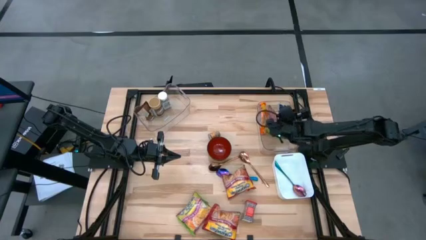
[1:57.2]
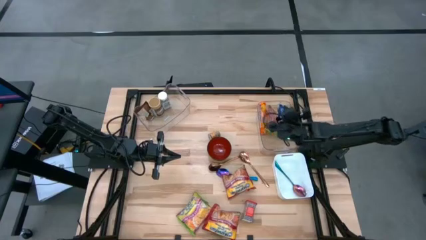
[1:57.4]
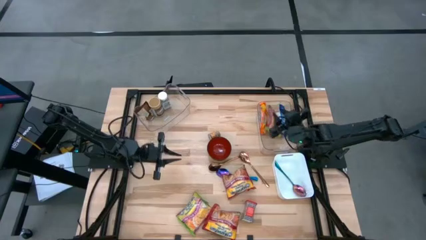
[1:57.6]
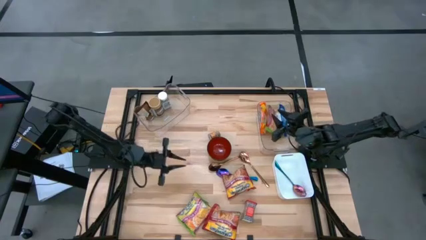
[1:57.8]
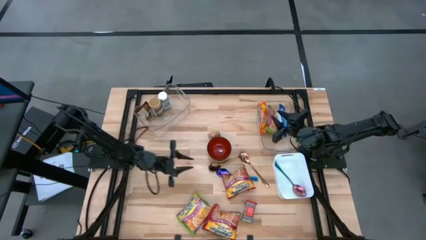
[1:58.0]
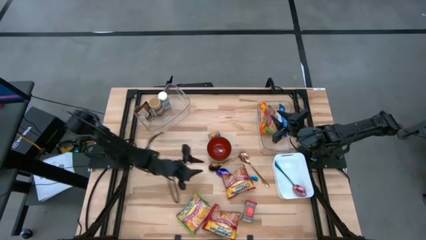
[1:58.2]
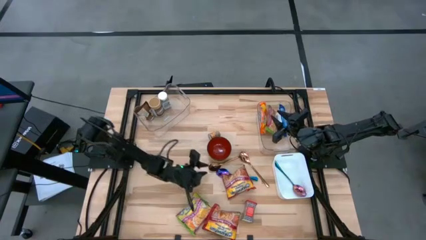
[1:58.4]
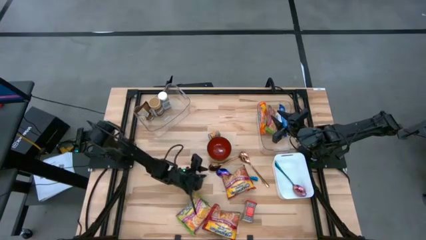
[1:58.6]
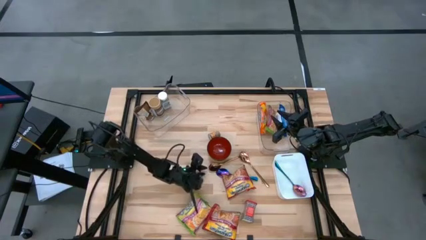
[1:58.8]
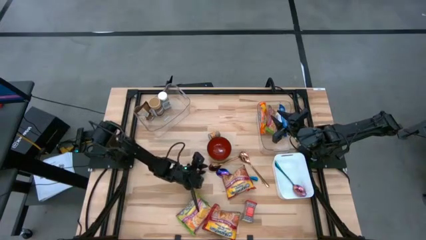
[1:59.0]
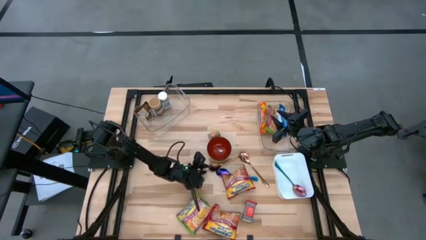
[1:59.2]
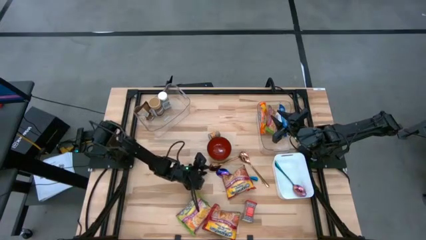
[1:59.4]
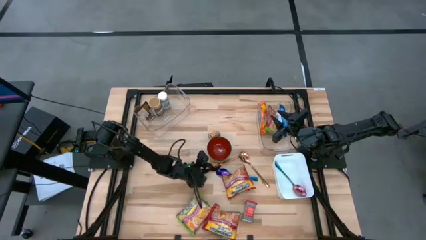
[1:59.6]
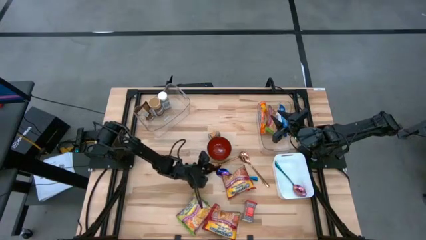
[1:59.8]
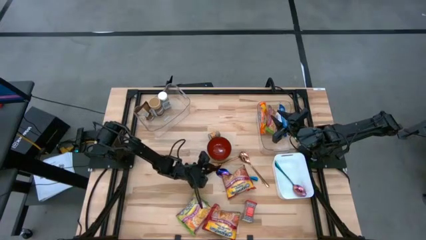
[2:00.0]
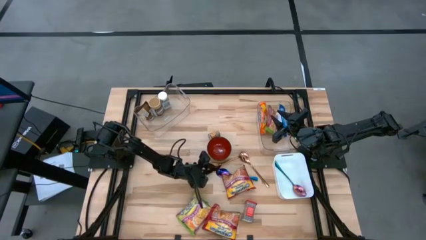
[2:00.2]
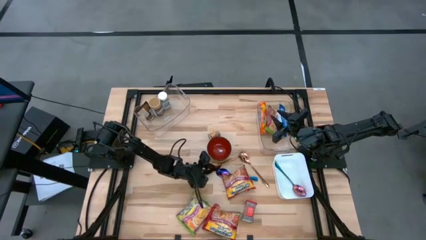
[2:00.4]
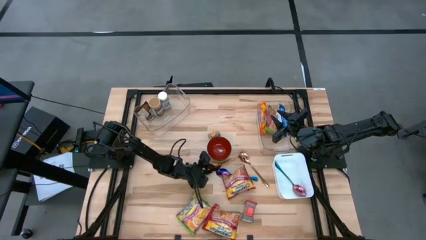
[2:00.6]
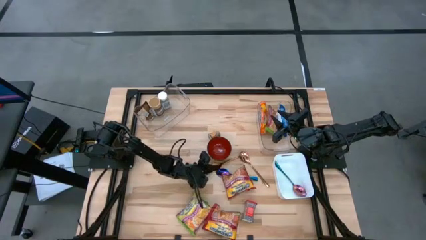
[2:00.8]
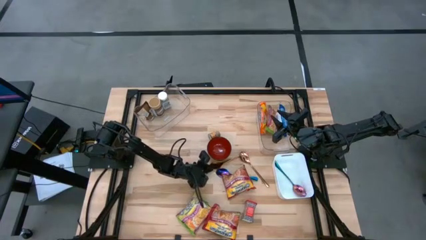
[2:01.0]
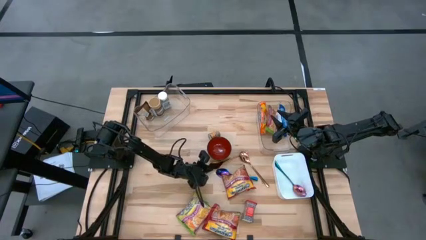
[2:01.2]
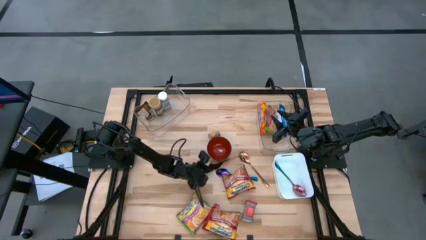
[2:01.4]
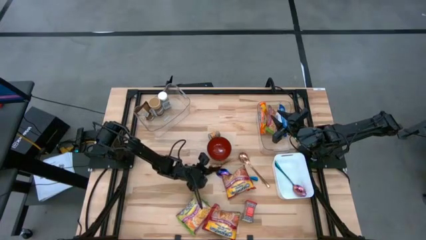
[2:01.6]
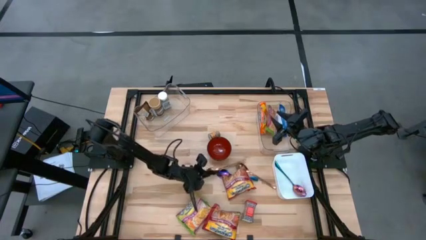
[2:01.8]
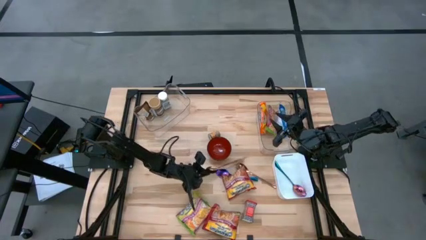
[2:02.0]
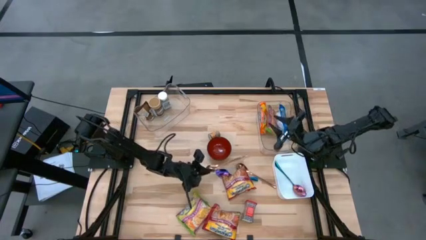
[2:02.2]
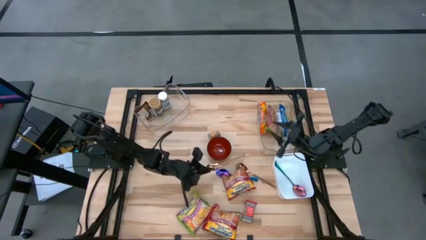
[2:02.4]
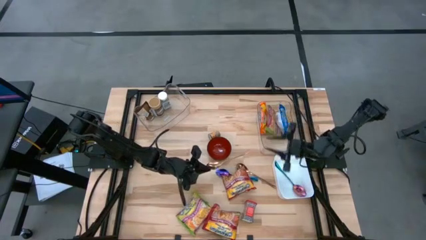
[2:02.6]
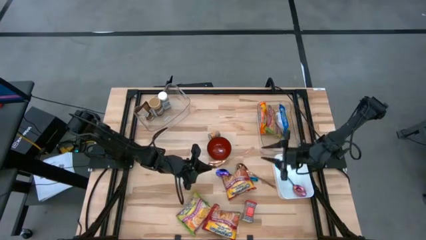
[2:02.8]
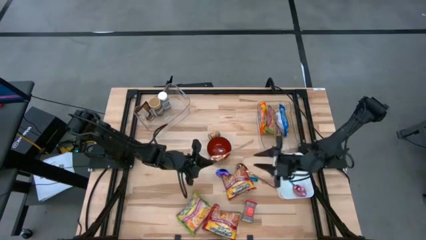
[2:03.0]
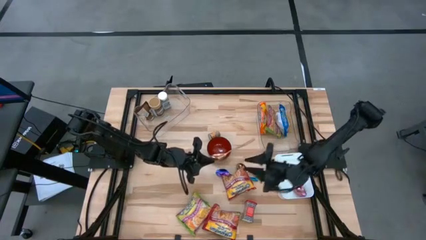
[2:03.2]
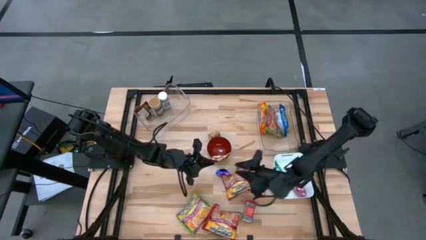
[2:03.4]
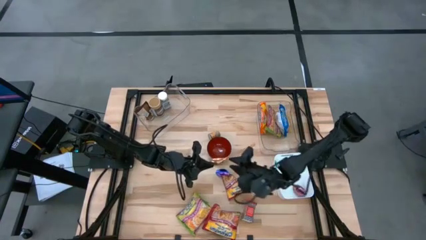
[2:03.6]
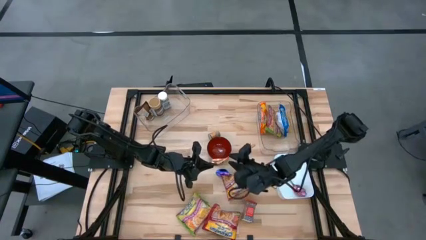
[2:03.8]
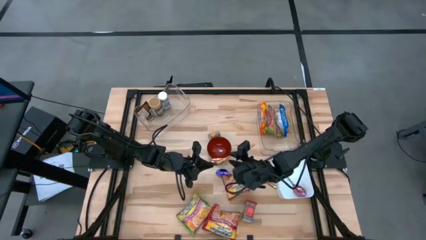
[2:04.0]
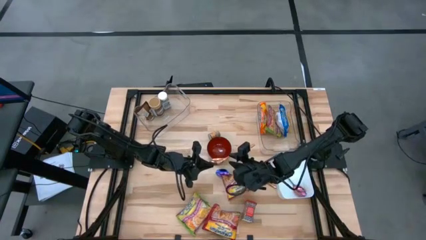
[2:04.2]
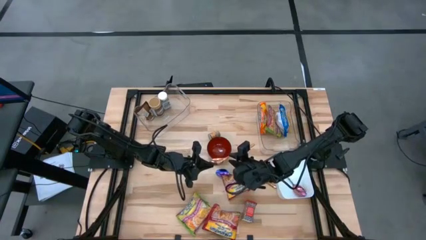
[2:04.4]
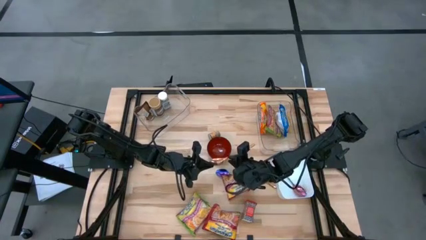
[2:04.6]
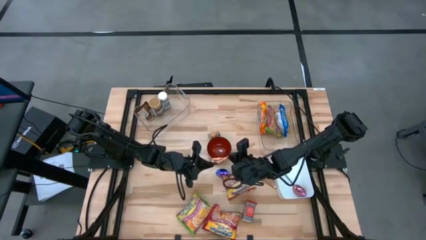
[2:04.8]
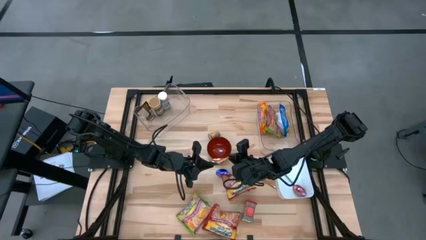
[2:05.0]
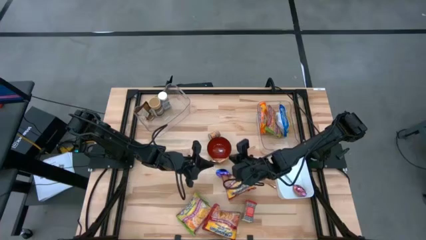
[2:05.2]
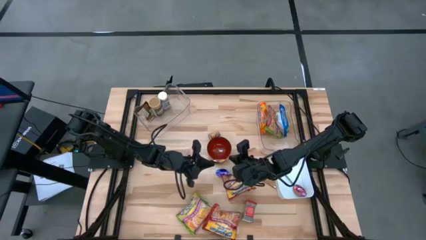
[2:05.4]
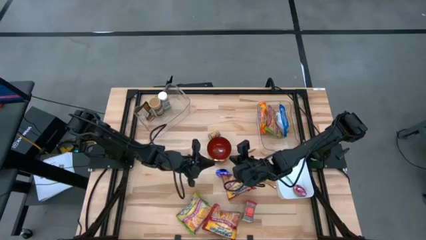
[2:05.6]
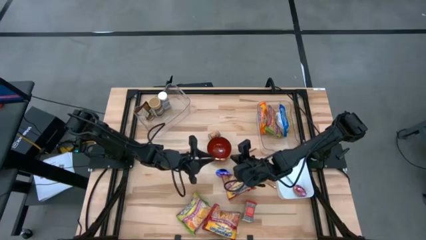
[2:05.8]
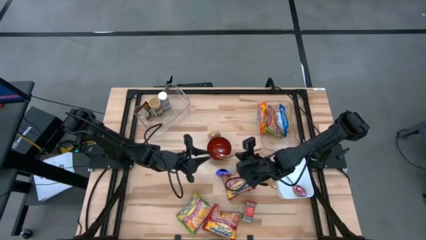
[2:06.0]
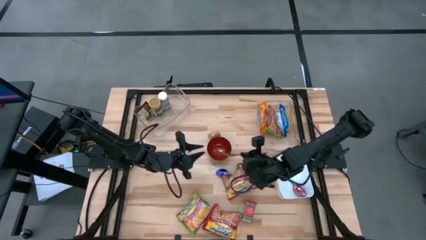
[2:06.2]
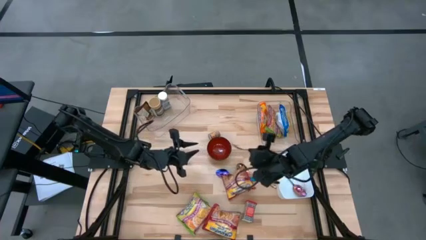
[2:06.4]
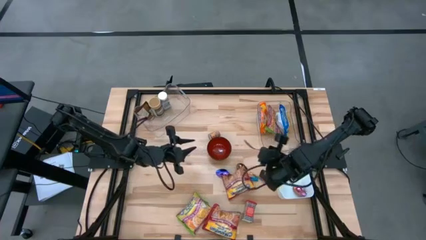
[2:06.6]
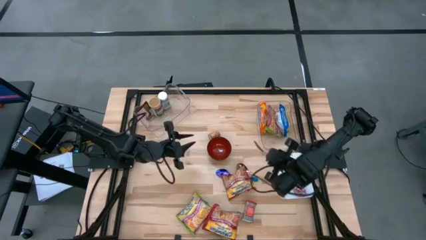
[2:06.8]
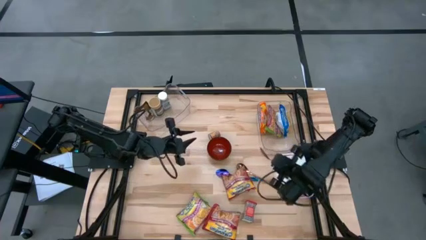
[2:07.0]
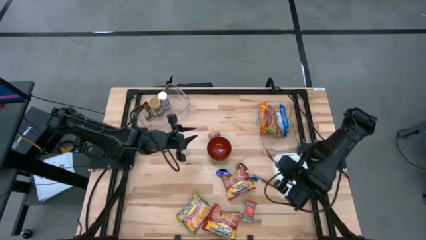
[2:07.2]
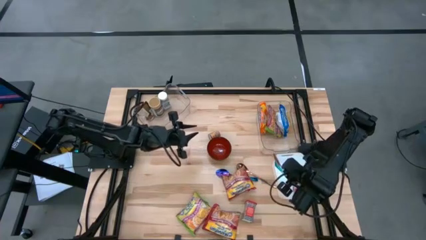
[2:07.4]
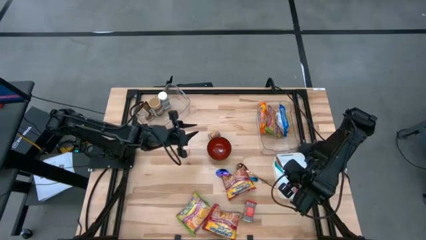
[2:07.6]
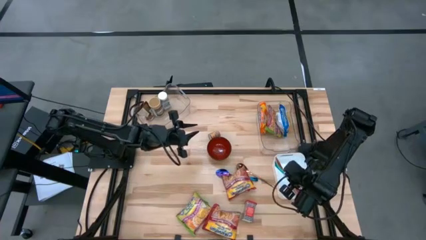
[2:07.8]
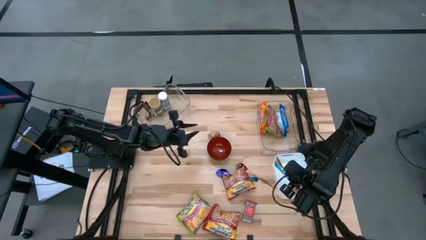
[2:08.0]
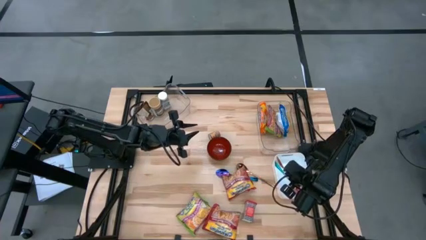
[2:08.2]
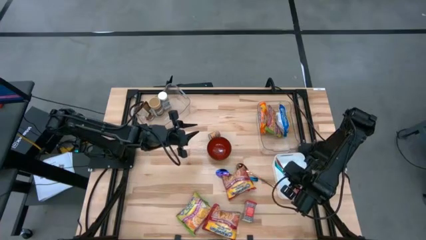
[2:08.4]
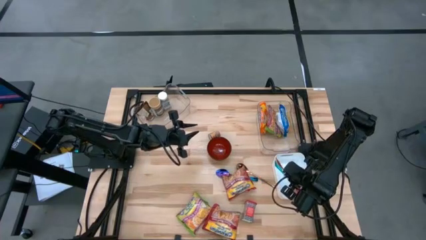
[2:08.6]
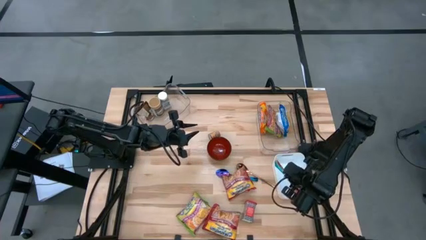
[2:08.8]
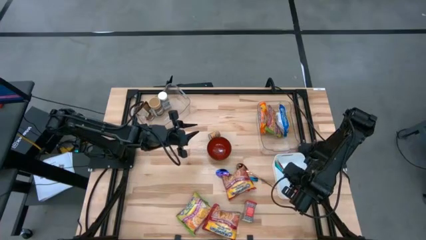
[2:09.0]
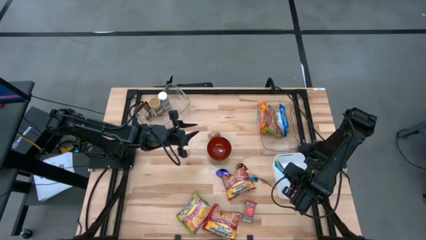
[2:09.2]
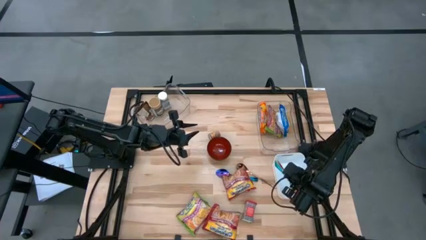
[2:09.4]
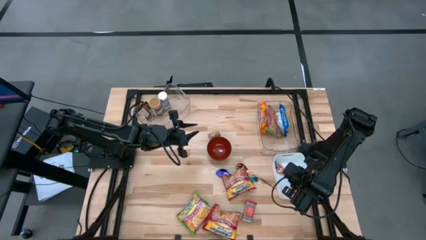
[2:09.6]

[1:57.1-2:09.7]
Task: Pick & Place Food Item
Put the left brown spoon into the white bin

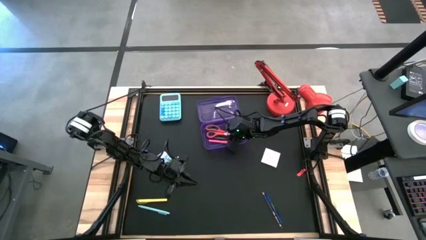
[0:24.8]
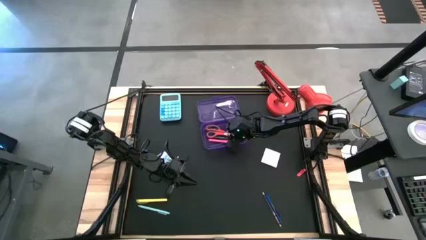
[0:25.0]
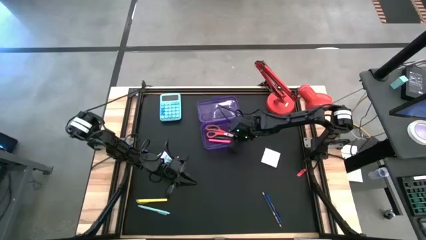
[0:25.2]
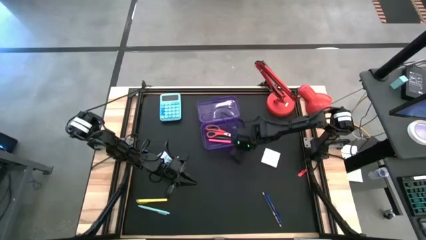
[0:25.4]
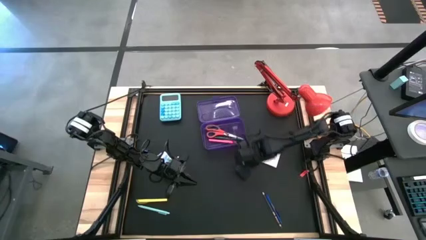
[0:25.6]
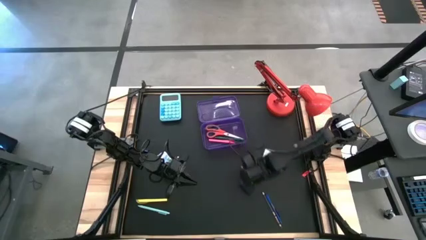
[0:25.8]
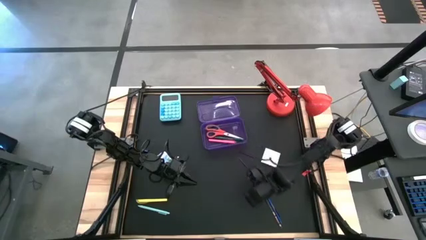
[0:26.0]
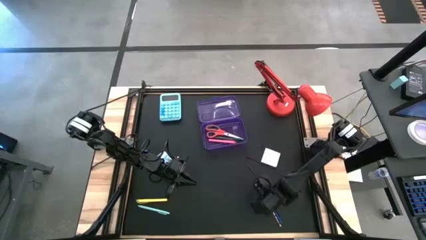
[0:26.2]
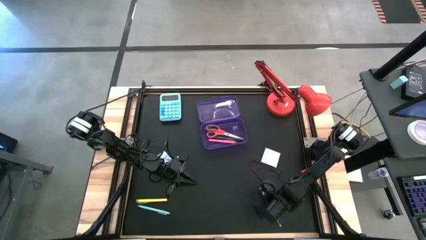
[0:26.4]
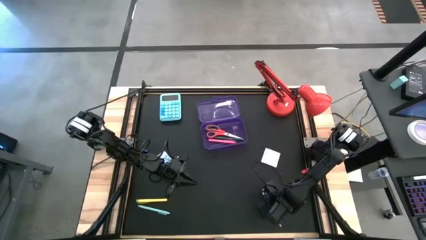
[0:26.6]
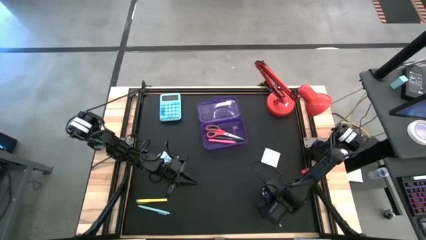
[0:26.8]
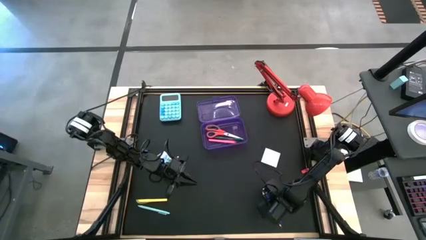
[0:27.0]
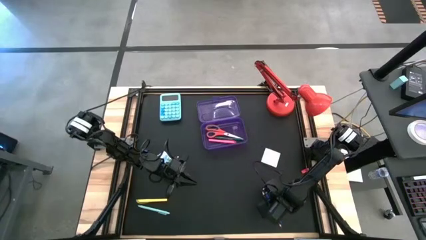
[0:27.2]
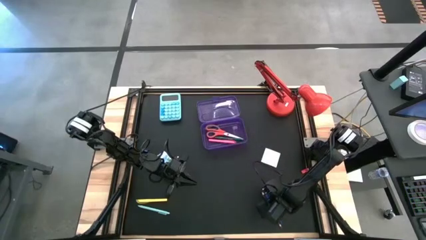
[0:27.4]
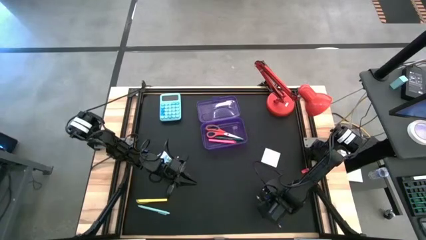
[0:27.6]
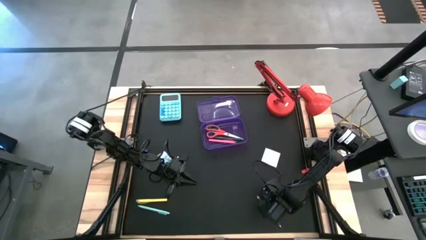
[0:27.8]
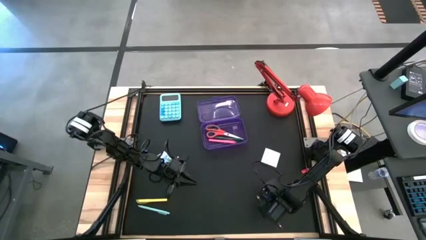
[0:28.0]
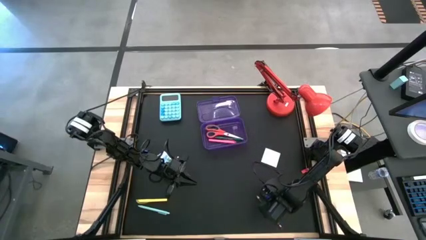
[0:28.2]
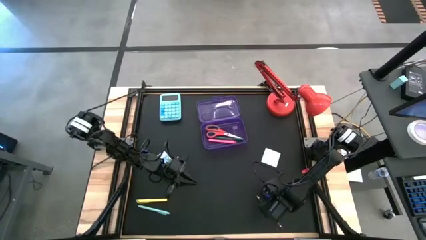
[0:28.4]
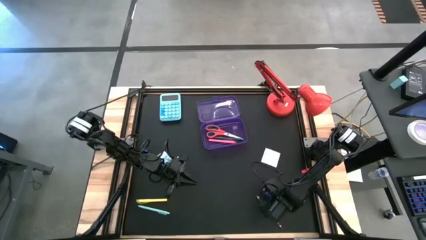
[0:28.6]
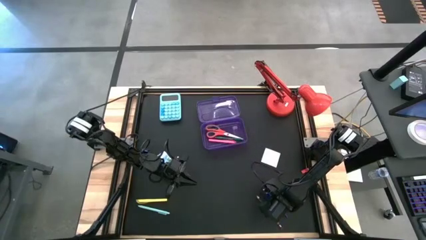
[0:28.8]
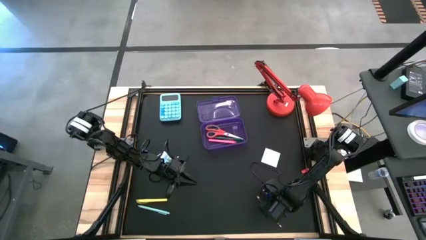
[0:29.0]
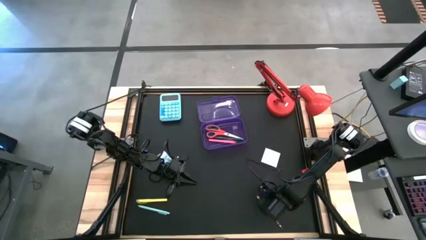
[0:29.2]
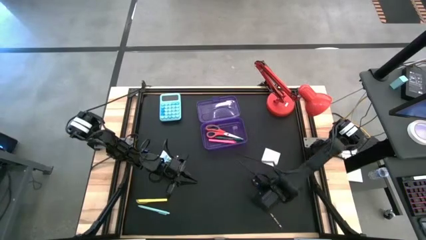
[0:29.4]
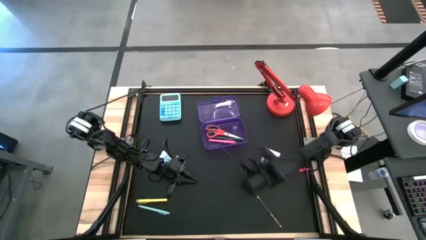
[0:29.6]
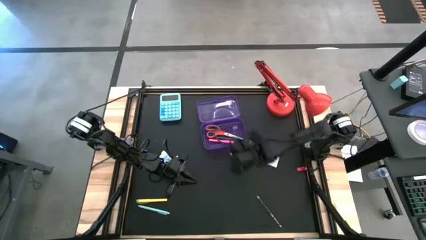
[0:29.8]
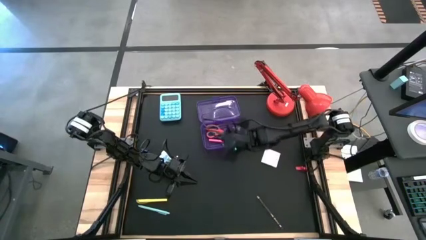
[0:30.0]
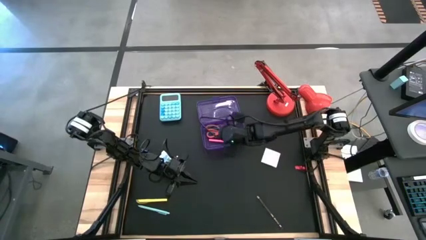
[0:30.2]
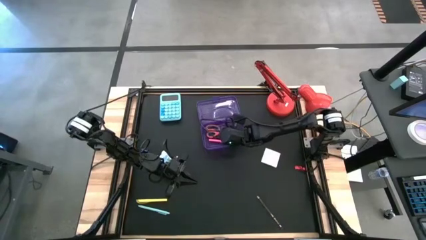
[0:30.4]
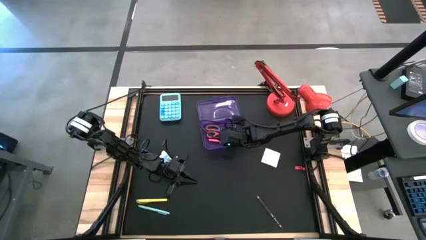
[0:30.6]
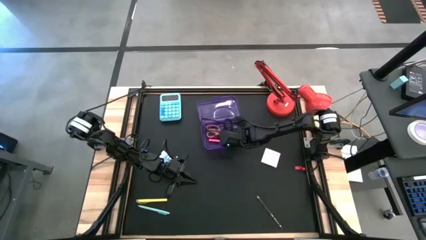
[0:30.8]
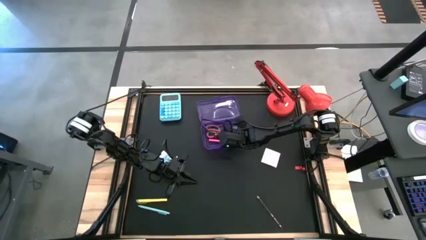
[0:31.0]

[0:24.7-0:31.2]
Task: Pack school essentials
Put the blue pen into the violet supply box
